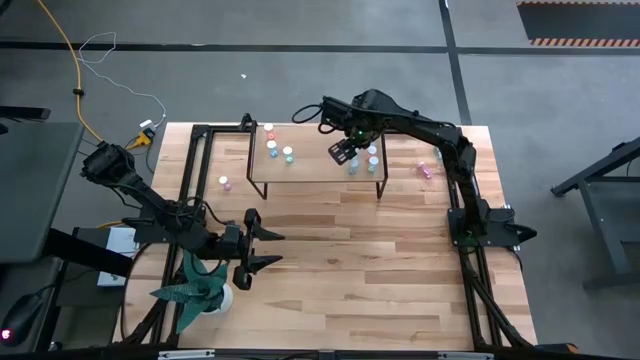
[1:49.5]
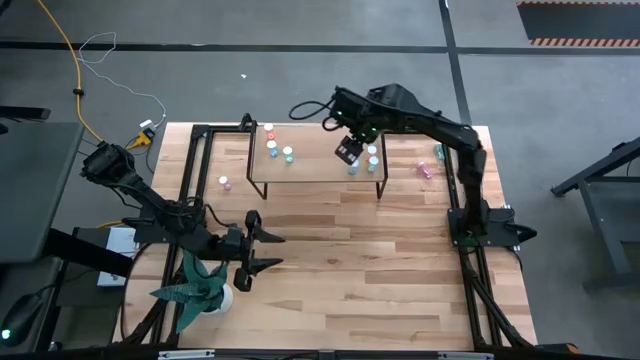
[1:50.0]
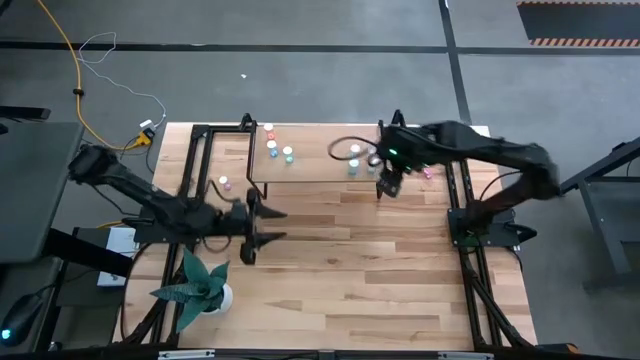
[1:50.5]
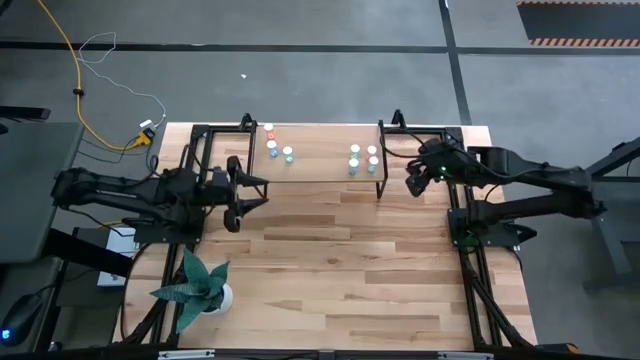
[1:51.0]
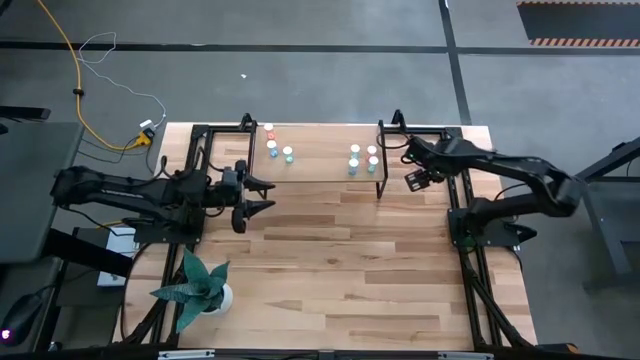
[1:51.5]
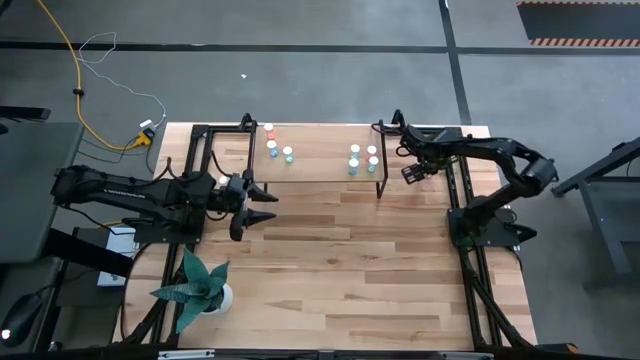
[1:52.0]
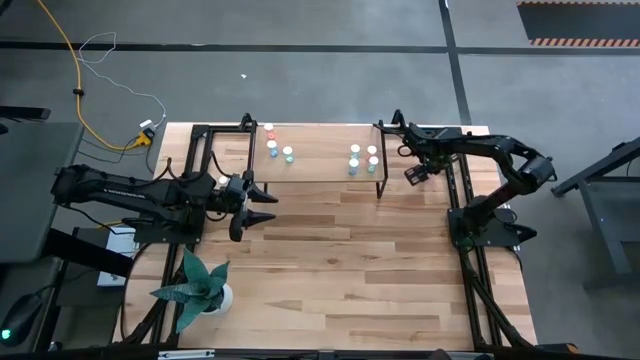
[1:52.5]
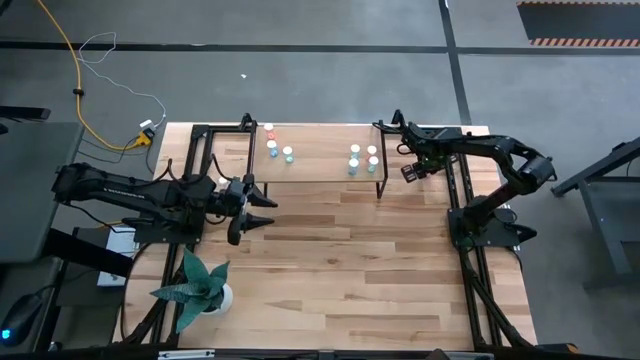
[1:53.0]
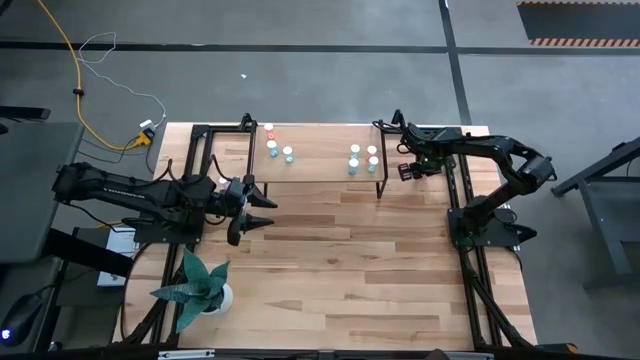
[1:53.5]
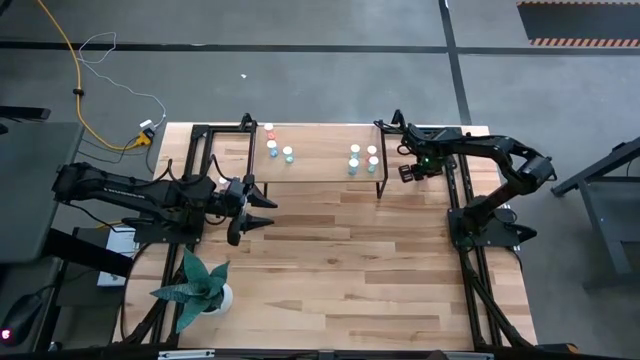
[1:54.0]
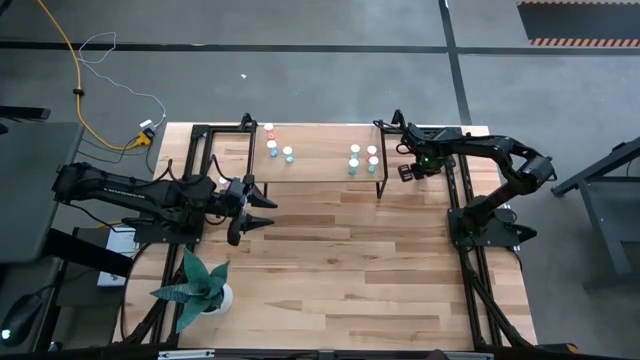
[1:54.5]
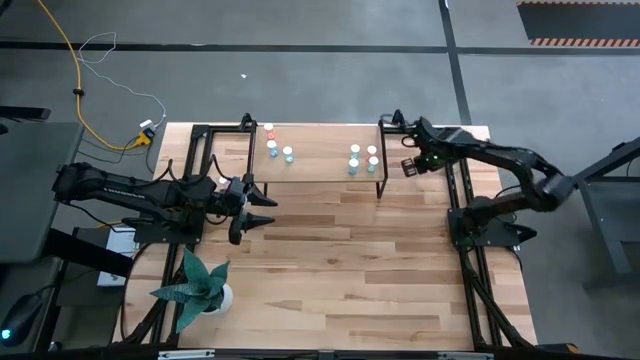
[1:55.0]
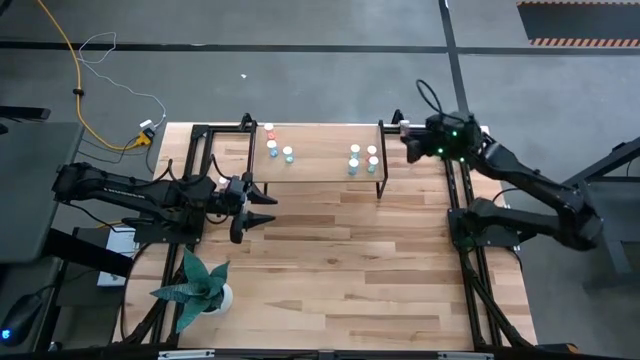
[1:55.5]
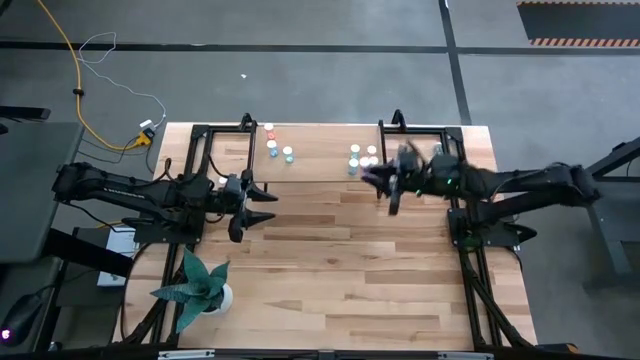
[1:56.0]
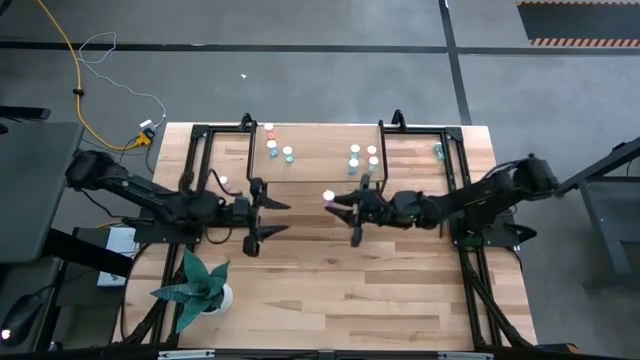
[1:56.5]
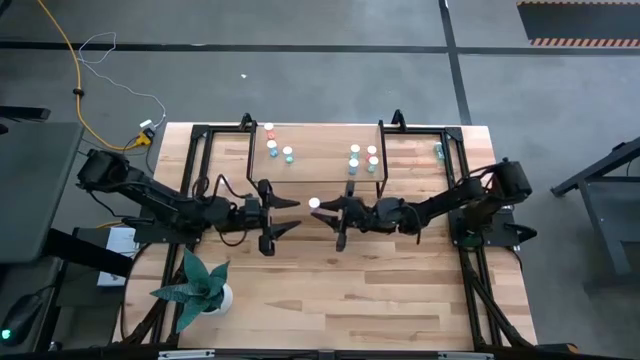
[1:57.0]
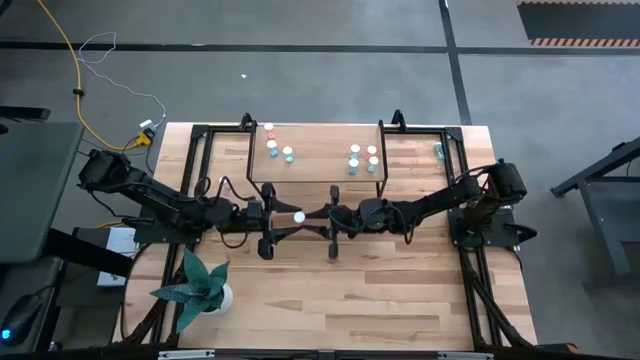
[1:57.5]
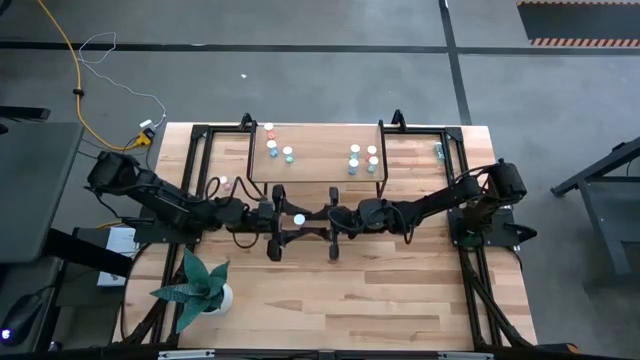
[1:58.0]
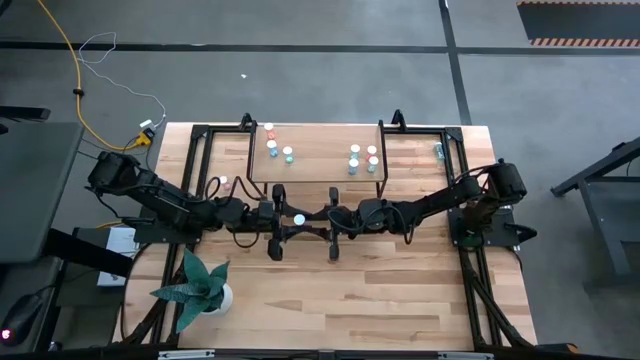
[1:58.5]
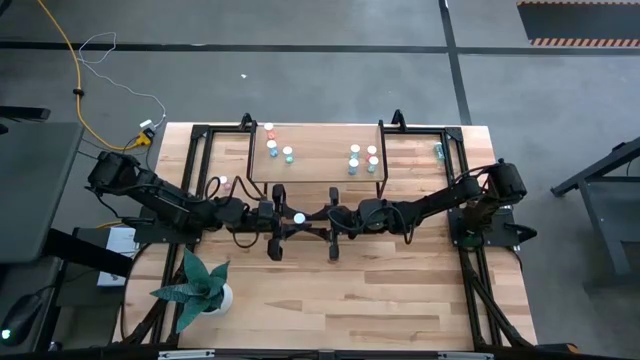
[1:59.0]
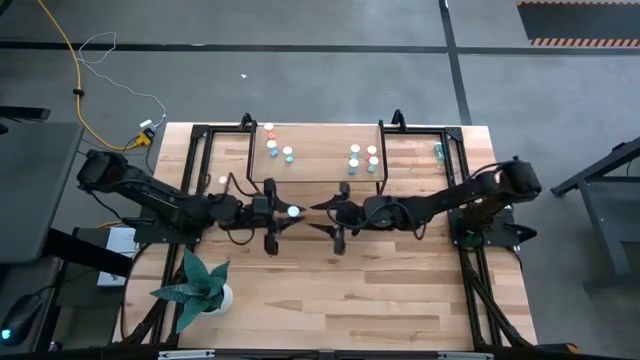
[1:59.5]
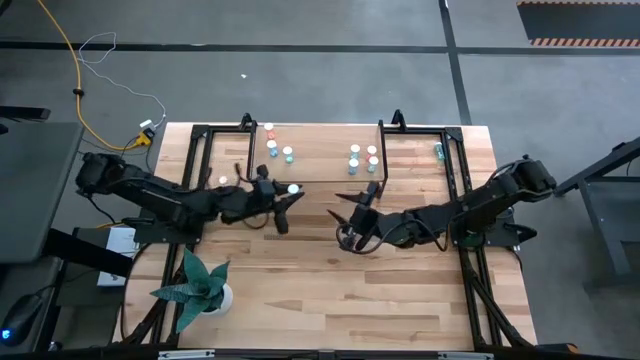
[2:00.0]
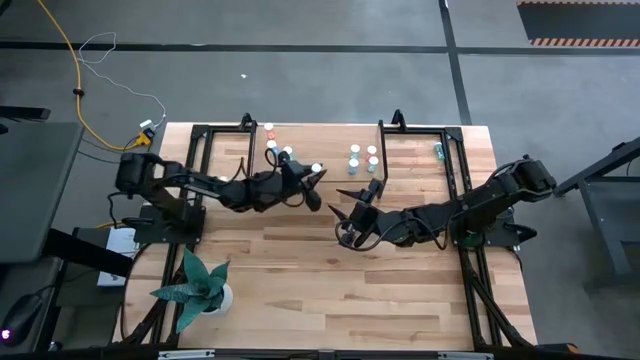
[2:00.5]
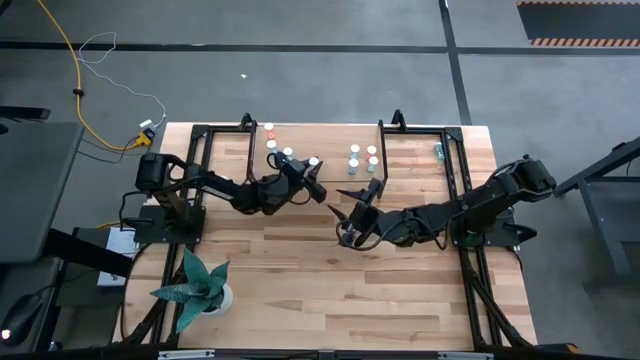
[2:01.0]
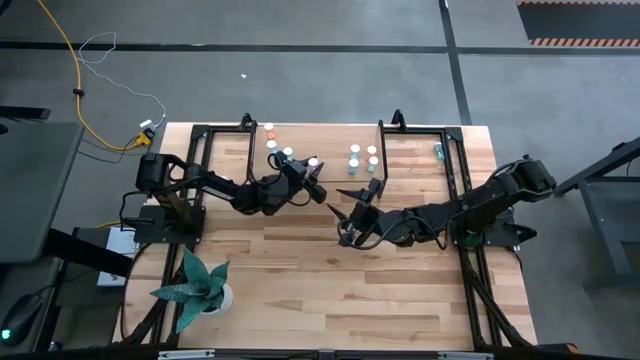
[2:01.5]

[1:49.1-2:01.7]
Task: Pick and place medicine bottles onto shelf by color
Put the pink pill bottle on the shelf

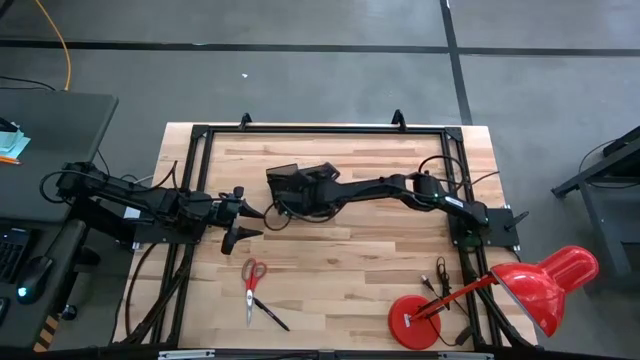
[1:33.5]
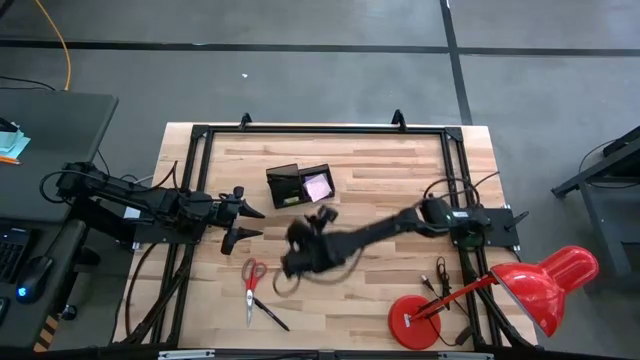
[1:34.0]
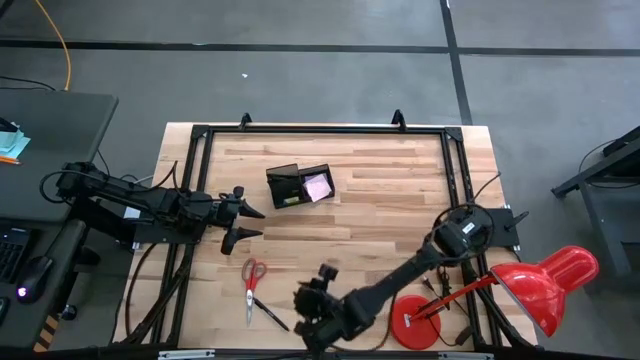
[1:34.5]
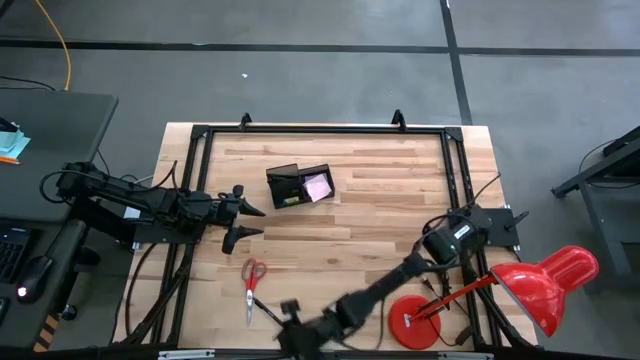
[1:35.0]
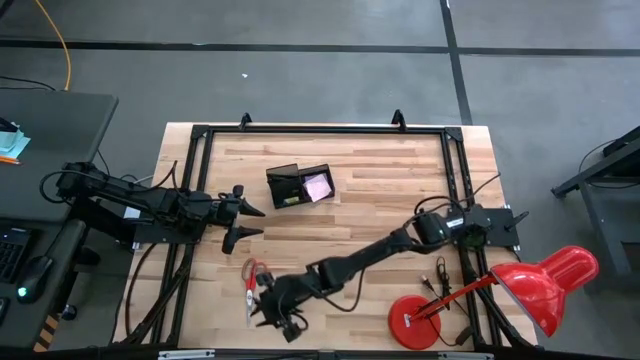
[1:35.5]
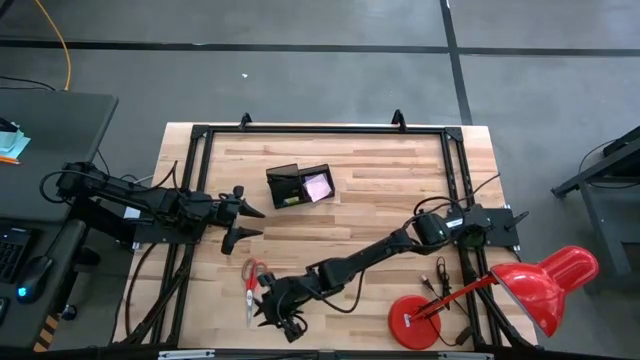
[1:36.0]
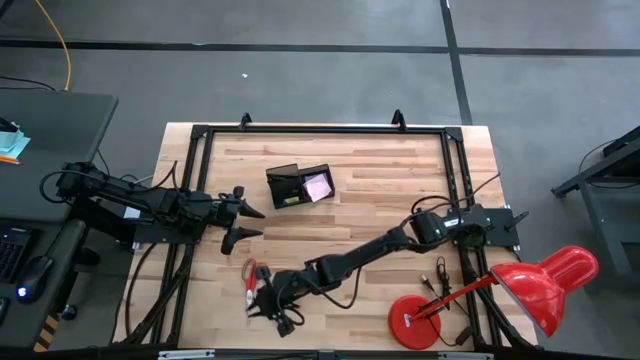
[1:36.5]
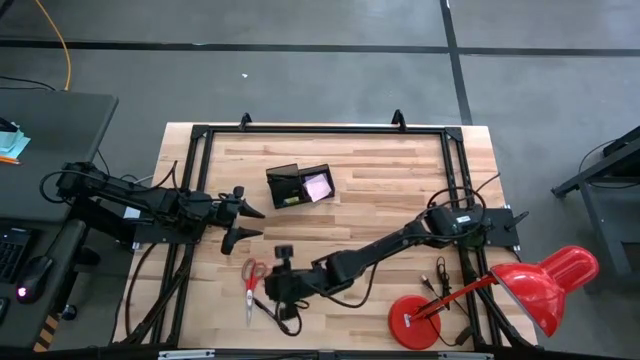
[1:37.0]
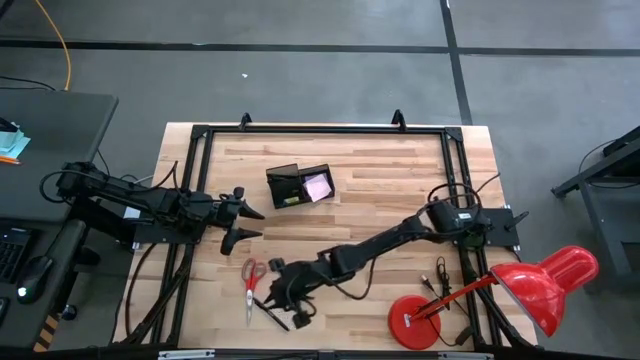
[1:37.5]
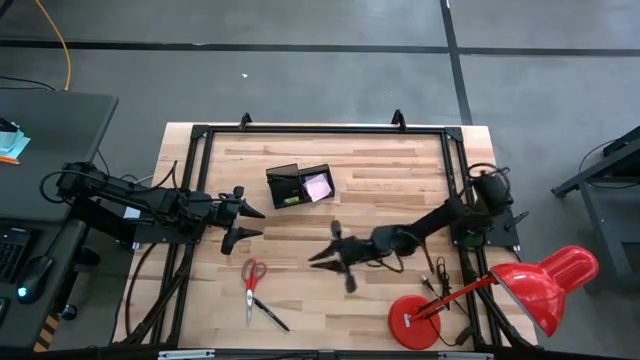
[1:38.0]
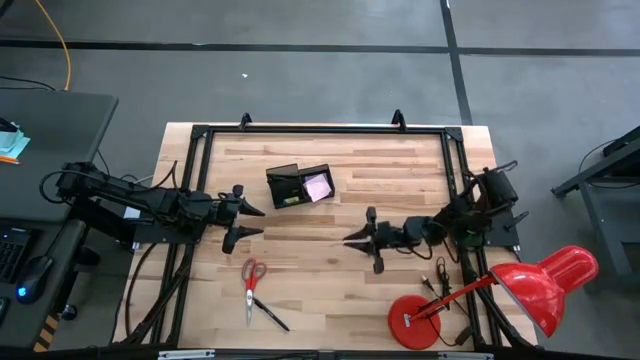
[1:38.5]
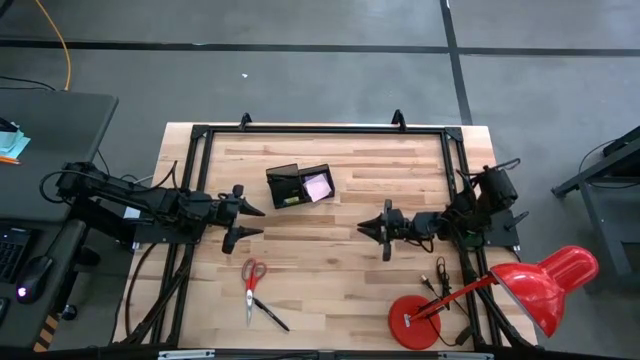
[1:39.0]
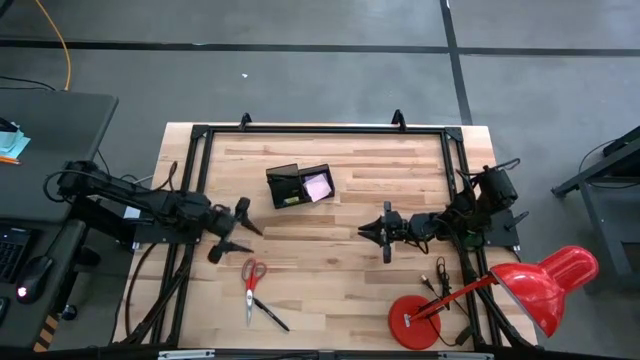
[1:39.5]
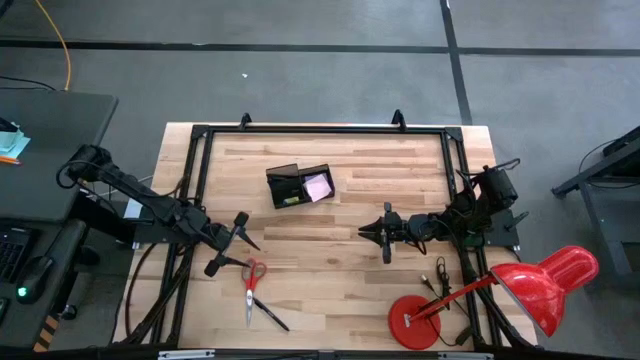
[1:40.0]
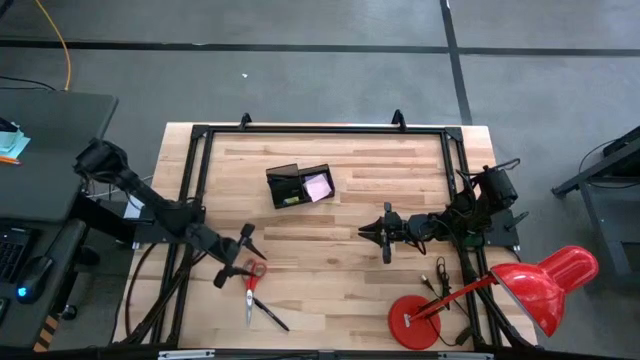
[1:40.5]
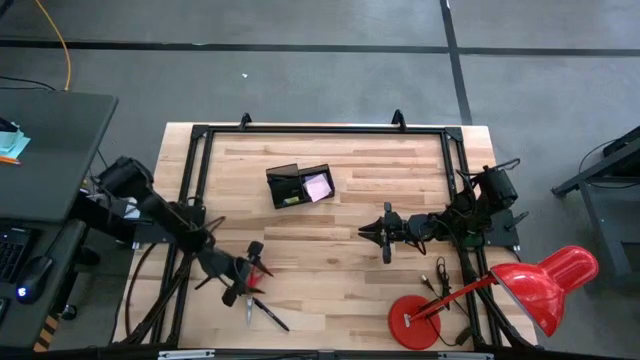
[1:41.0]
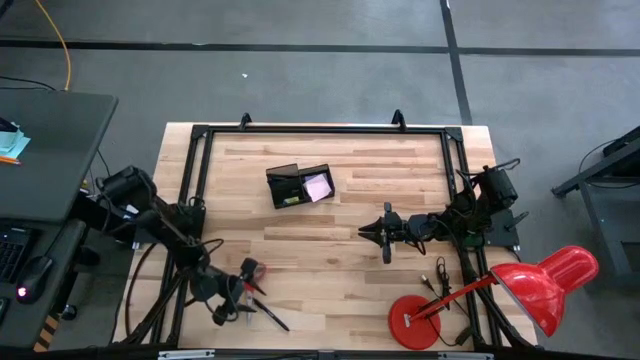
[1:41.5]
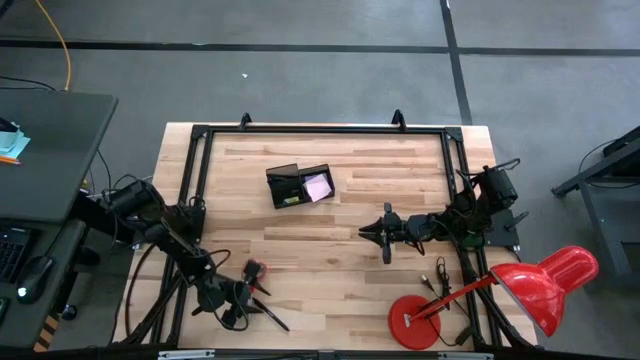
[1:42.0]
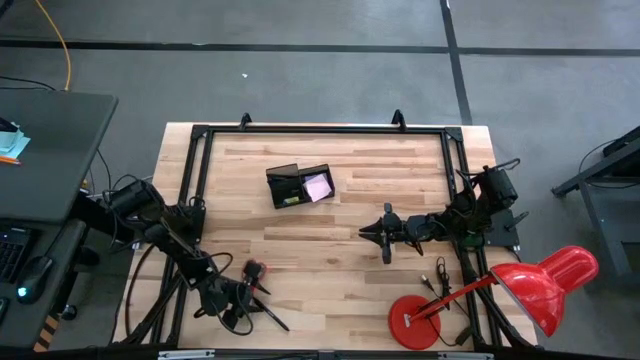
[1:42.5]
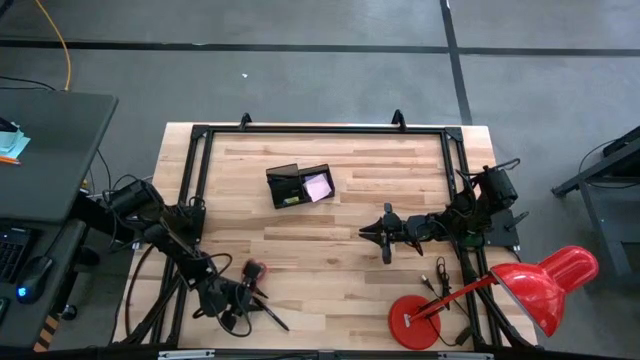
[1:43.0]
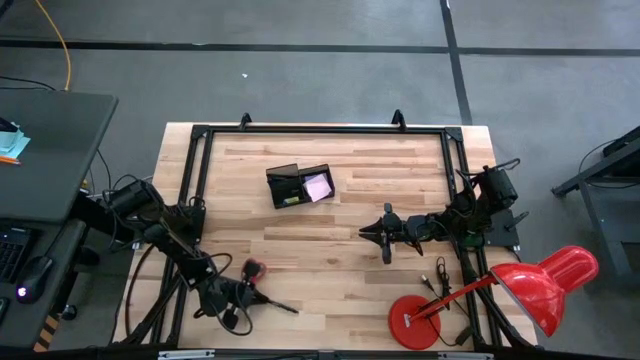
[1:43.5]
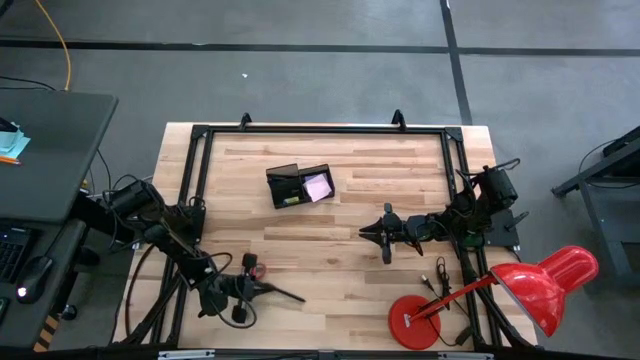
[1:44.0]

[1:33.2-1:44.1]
Task: Pick and place office supplies into organizer
Put the black pen into the black desk organizer
